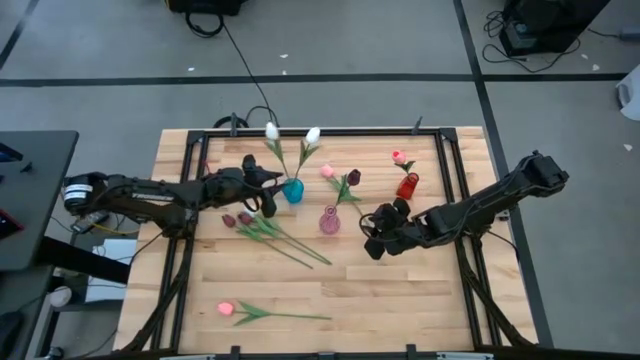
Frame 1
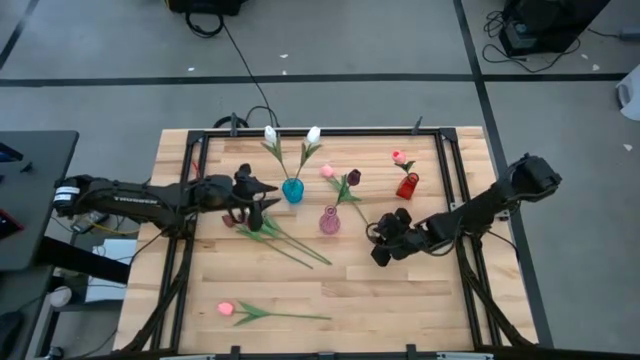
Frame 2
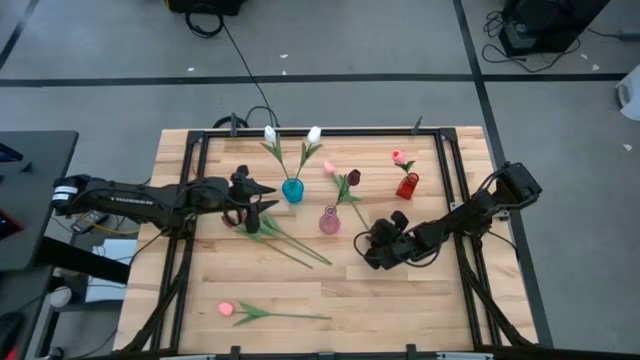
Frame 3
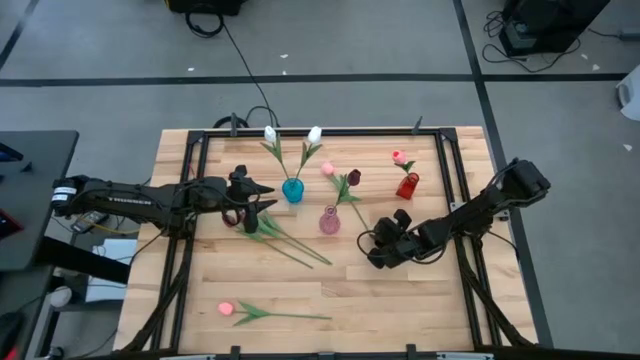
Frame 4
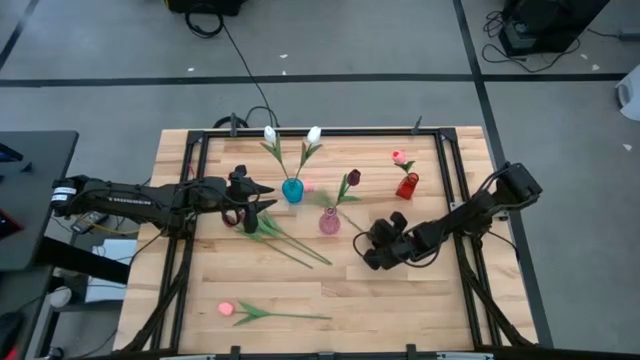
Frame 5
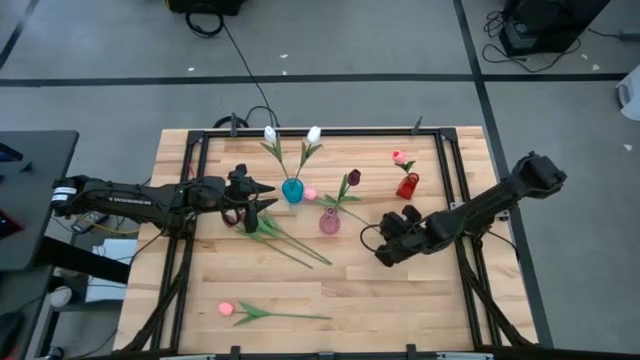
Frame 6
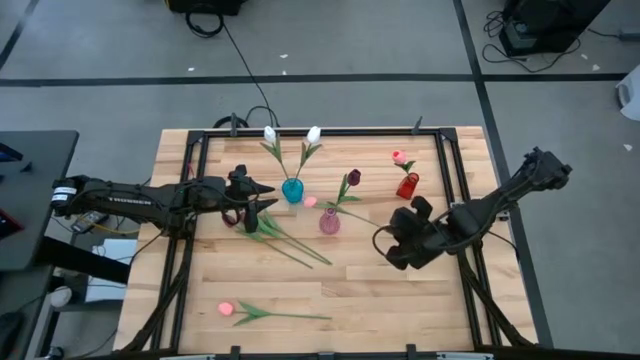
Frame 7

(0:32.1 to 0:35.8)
Task: Sort flowers into vase by color
Put the top pink tulip into the red vase

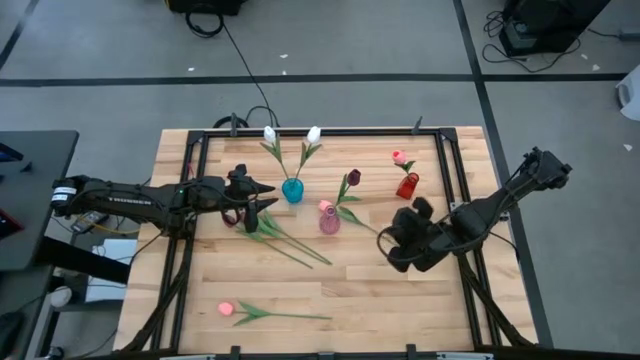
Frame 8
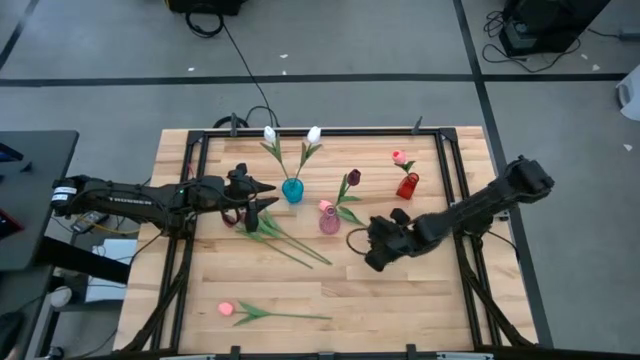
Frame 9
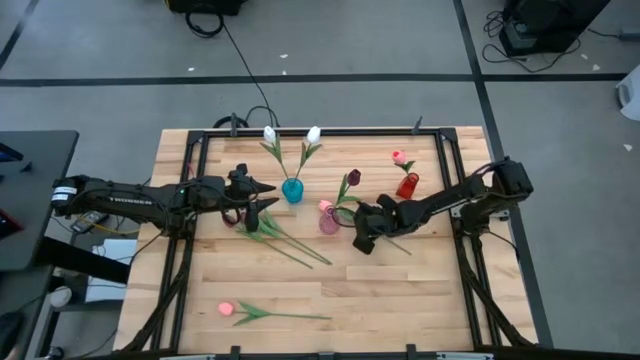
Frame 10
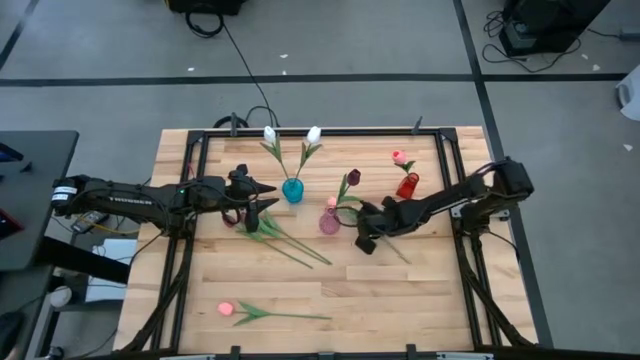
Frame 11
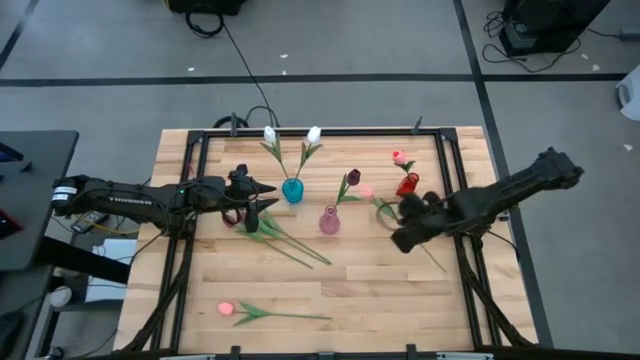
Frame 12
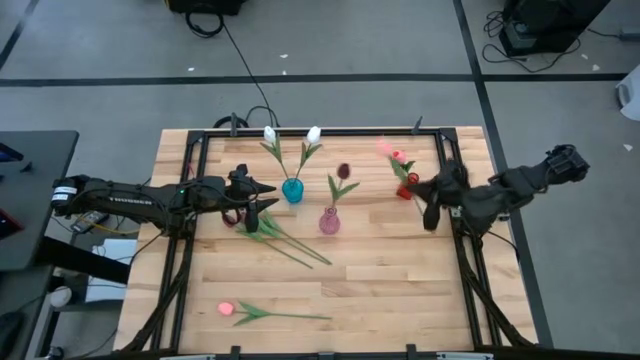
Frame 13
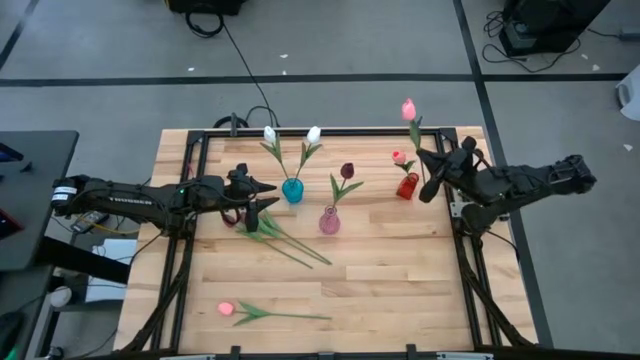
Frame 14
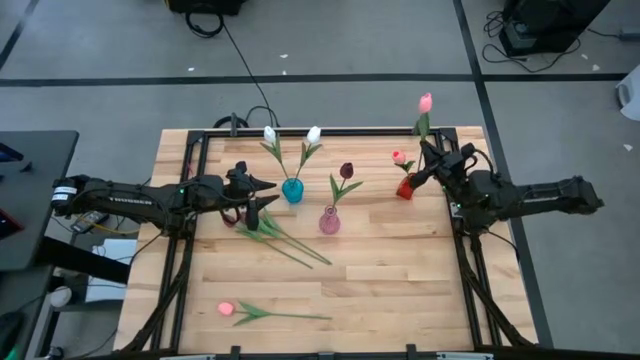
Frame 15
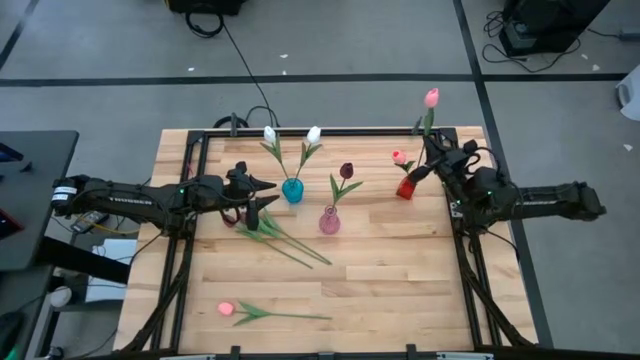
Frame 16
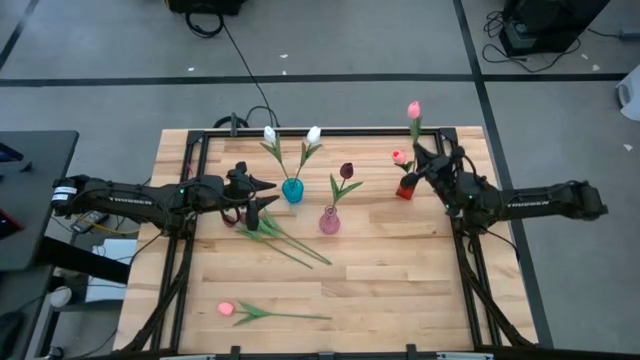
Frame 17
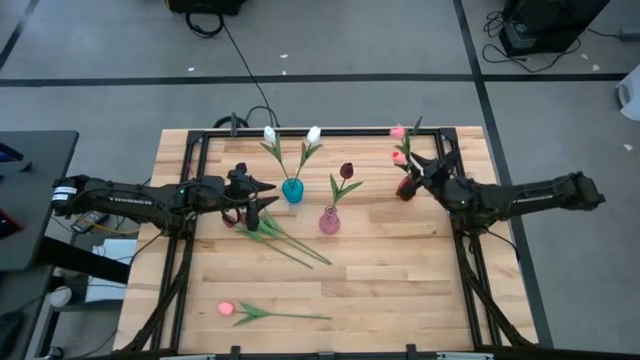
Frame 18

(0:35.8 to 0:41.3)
Put the top pink tulip into the red vase

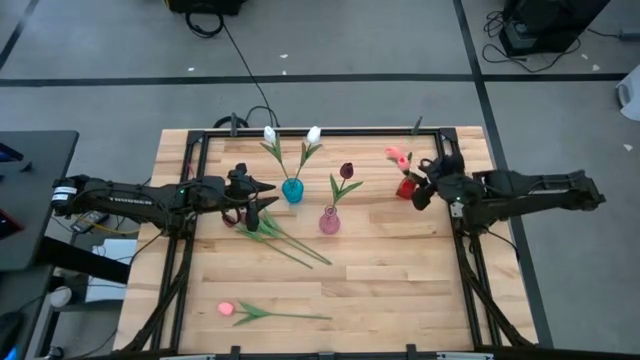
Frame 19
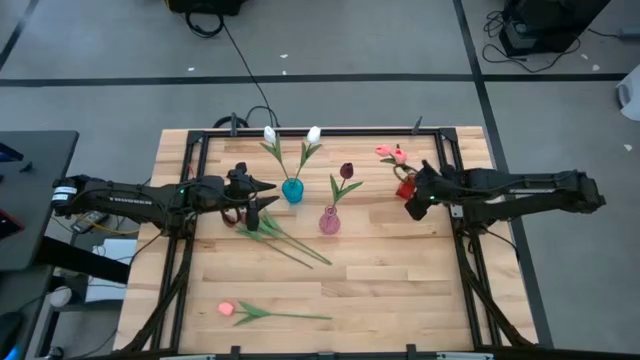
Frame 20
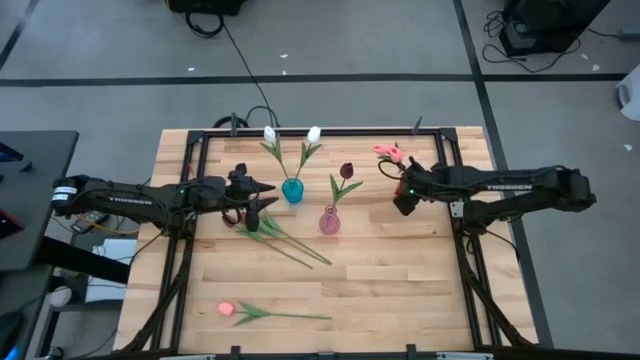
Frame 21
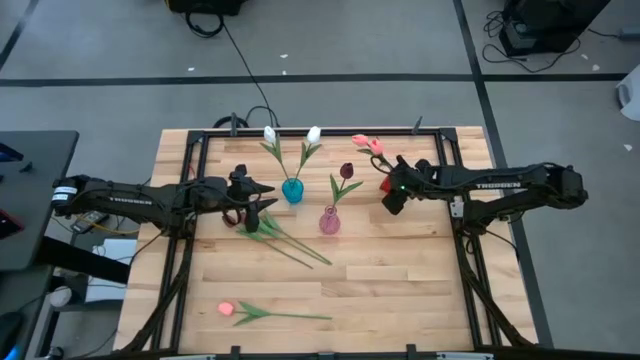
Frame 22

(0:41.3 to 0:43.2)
Adjust the red vase

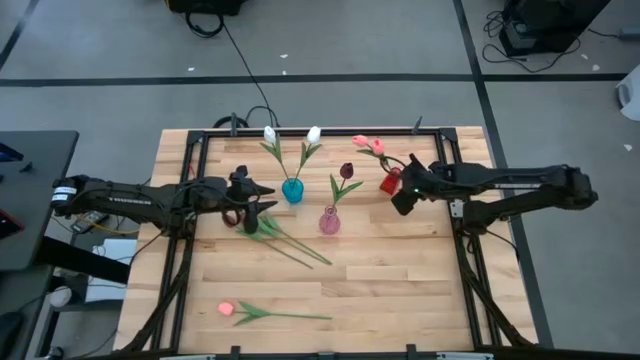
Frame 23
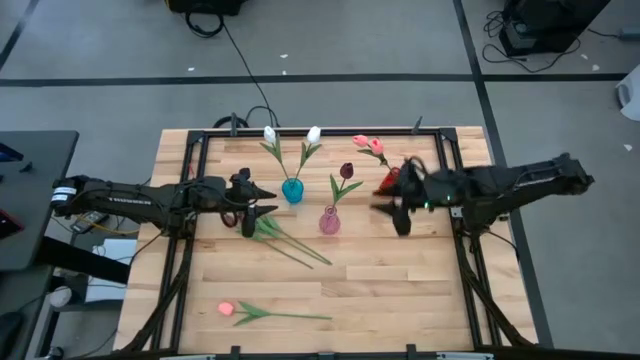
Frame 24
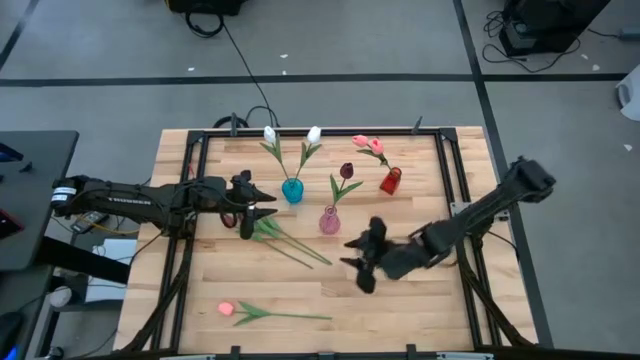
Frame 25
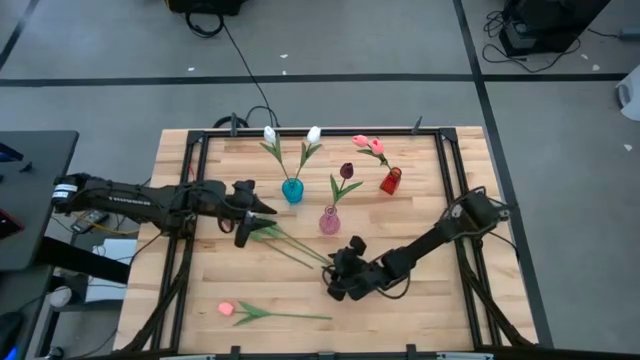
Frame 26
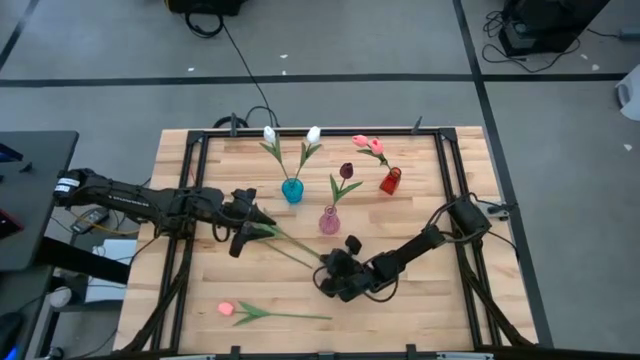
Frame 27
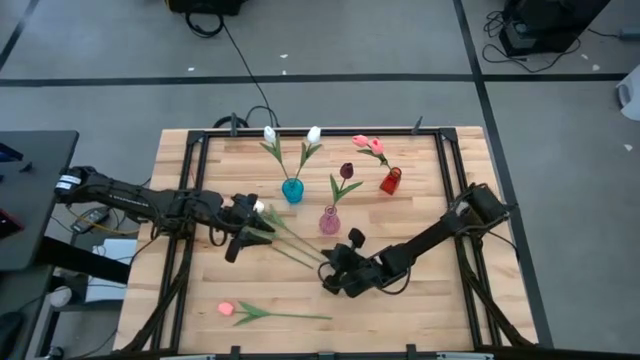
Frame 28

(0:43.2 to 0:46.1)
Put the white tulip into the blue vase

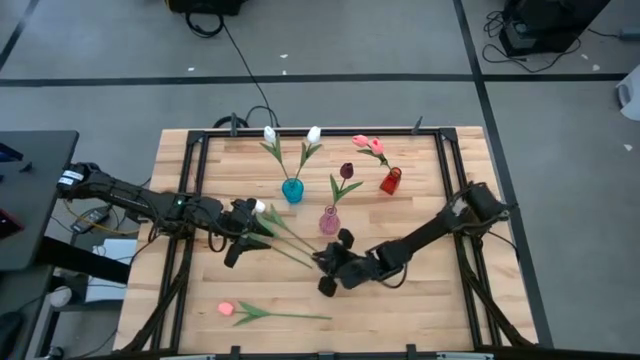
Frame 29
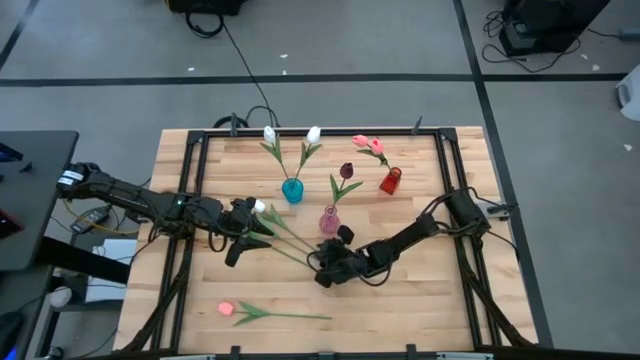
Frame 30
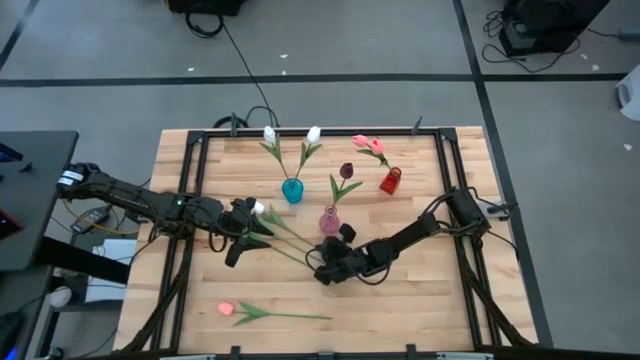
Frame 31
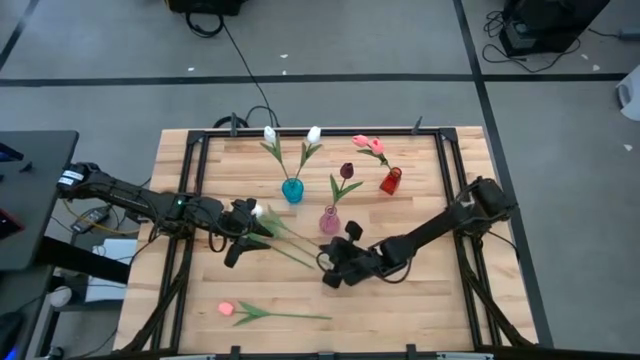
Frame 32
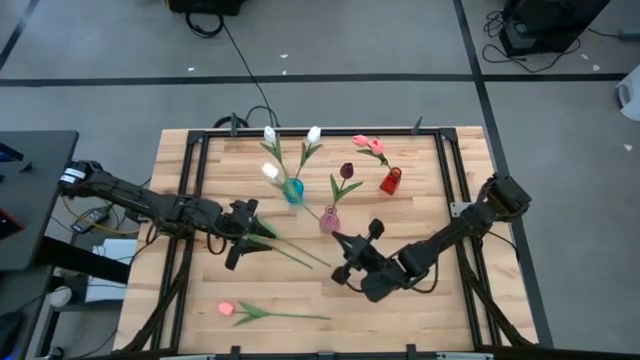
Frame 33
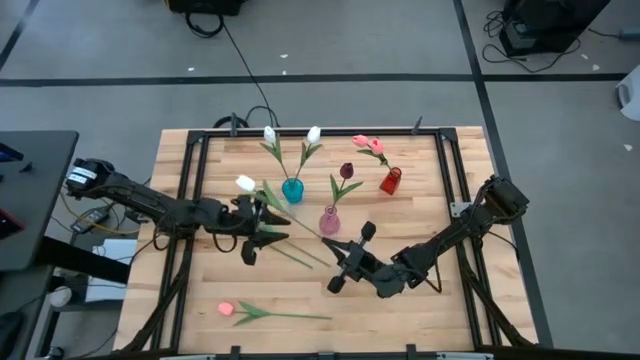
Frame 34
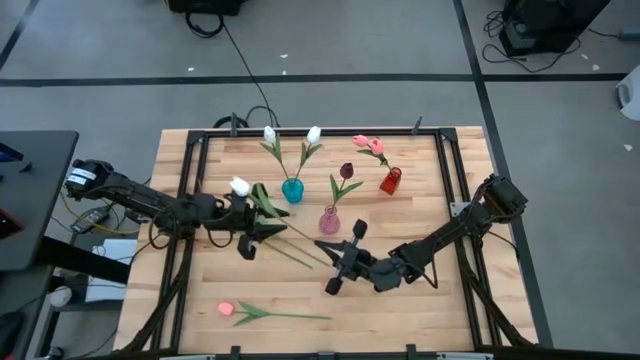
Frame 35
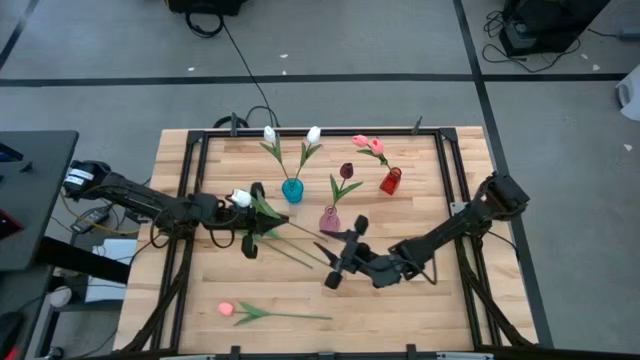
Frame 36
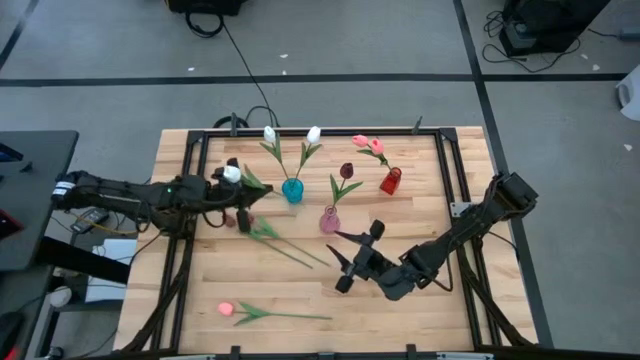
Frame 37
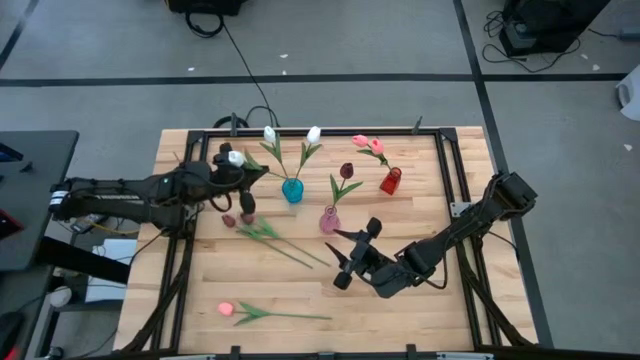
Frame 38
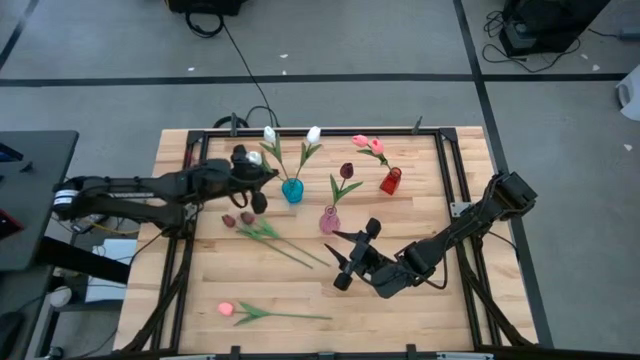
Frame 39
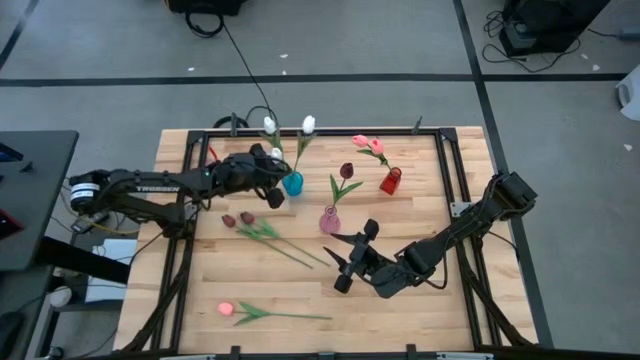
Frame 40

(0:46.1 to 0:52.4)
Put the white tulip into the blue vase

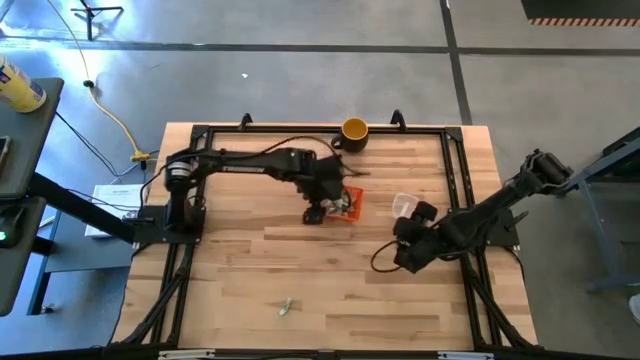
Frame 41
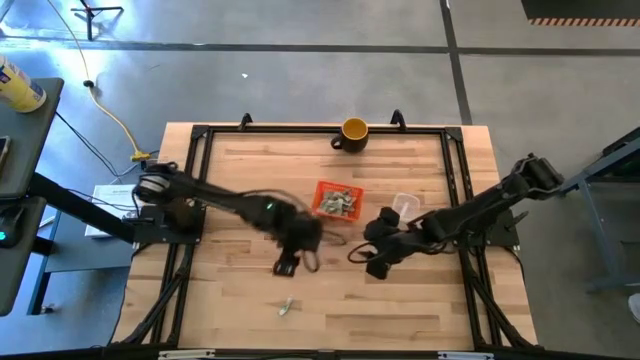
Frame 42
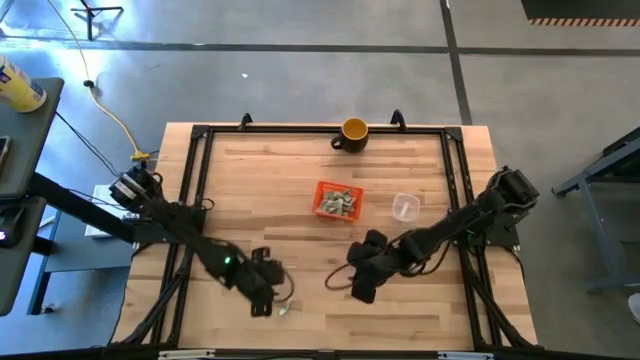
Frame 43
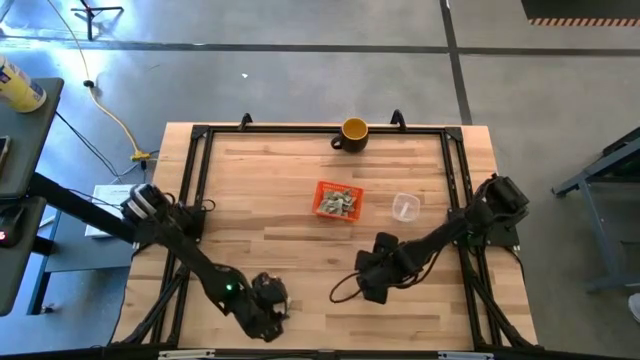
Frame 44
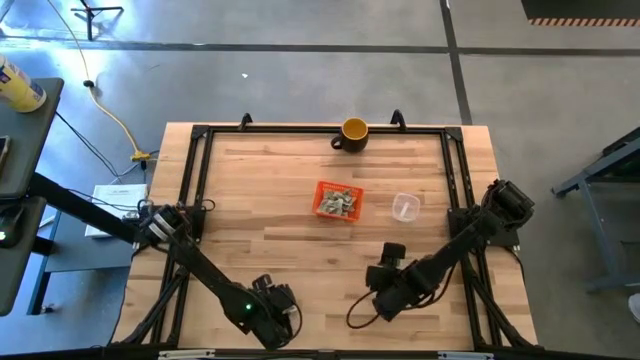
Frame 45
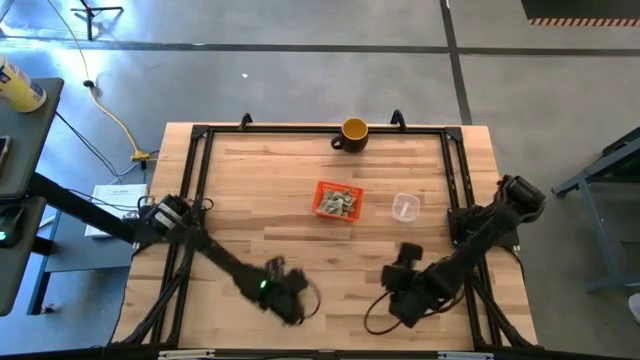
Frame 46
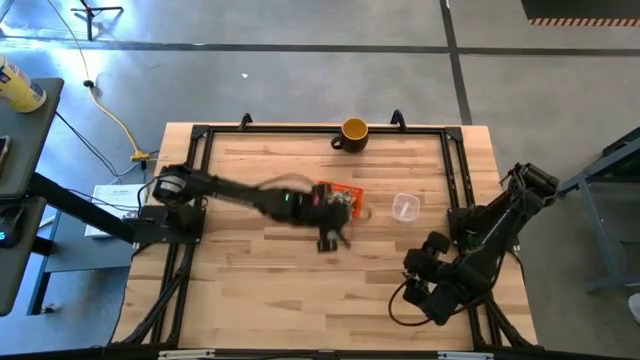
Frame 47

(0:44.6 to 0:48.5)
Task: Pick and place items into bin
Put the white stevia packet into the orange bin
